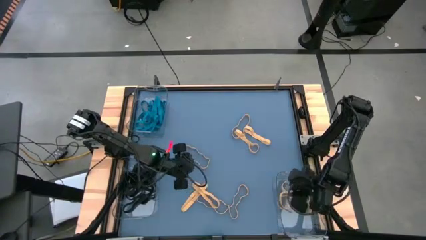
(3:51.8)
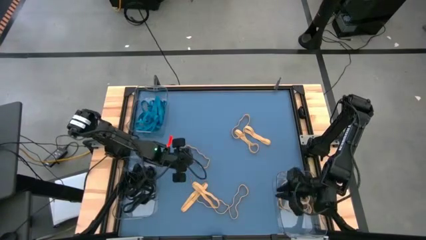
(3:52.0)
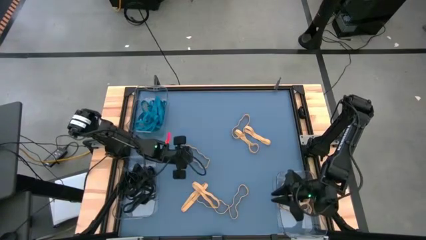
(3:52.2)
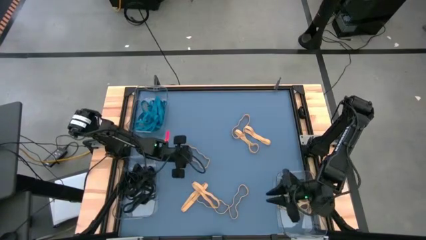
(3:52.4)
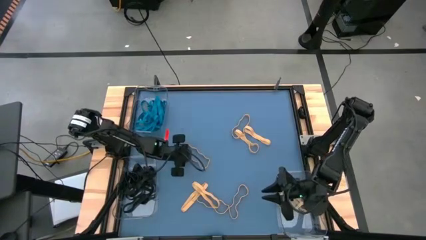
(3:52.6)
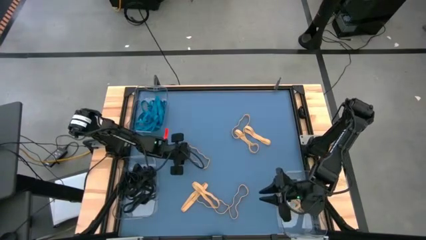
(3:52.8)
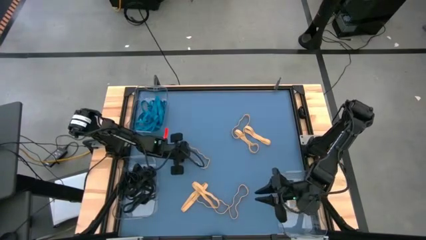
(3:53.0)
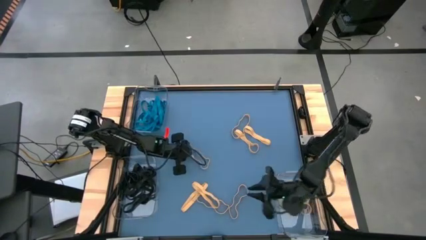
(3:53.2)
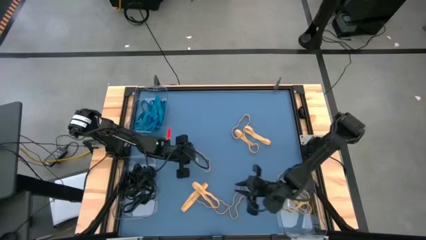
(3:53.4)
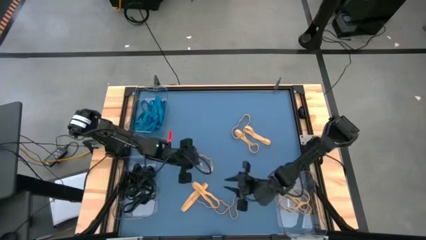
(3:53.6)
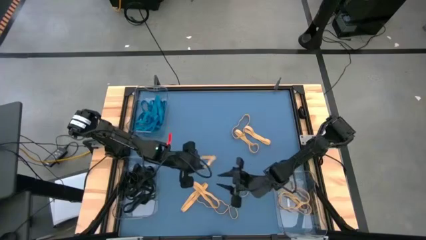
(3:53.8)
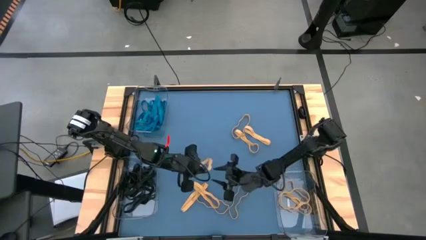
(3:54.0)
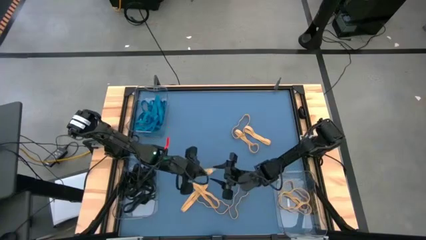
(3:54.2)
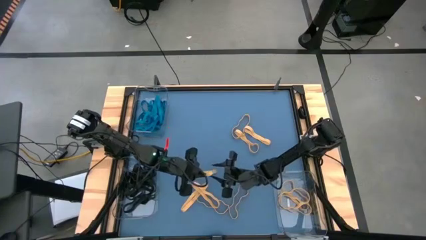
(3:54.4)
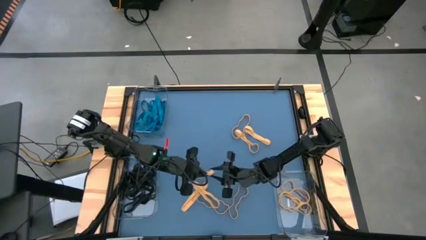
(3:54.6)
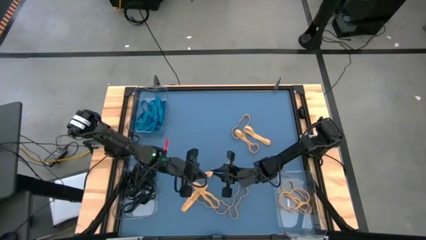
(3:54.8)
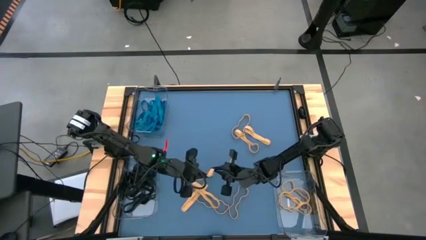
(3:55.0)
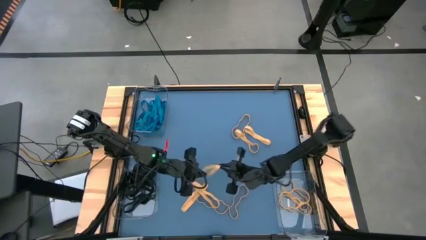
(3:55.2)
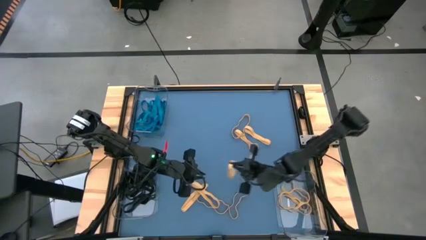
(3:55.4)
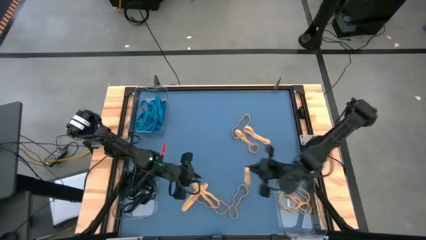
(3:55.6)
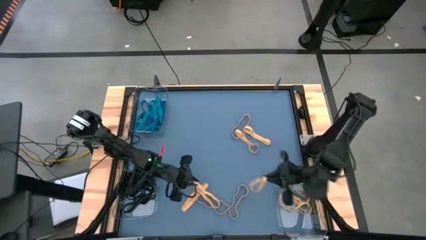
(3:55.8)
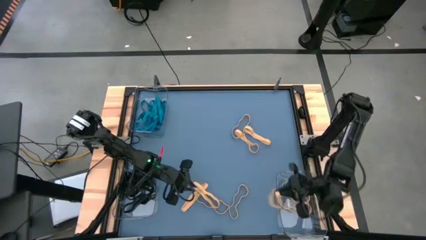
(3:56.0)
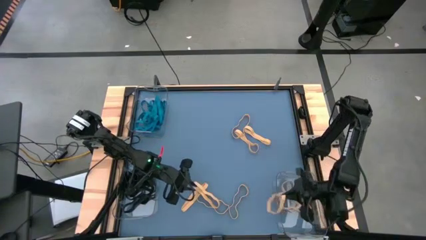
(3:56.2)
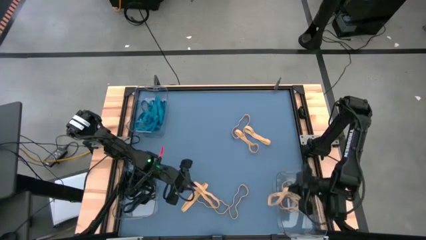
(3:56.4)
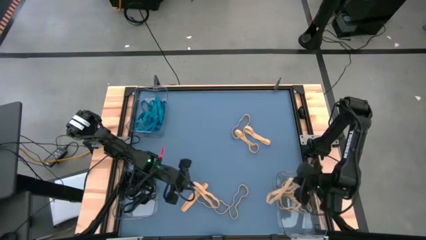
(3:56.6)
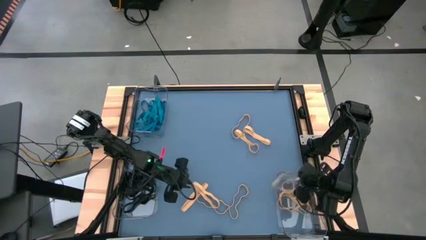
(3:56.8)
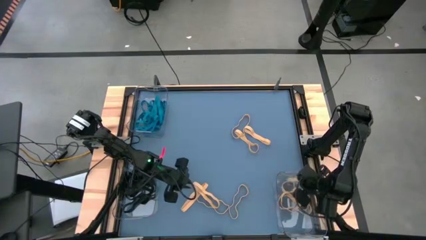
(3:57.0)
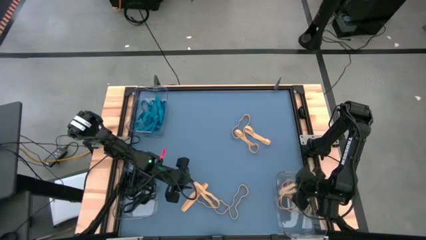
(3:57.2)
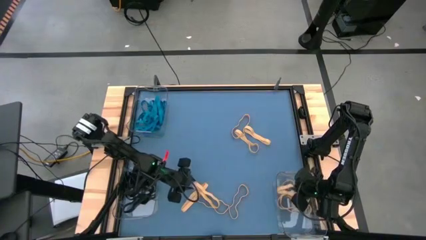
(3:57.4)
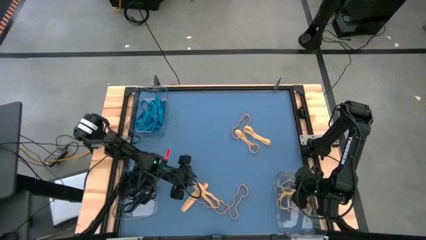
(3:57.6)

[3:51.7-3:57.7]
Task: Sort rubber bands into baskets
Put the yellow rubber band into the bottom right transparent bin

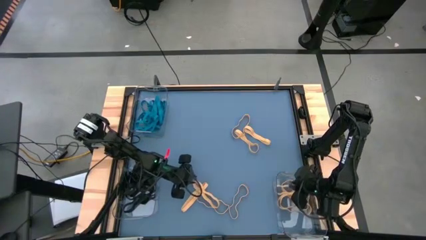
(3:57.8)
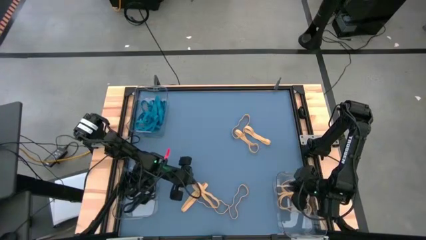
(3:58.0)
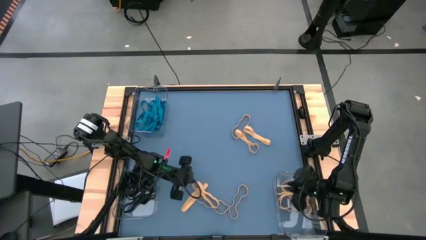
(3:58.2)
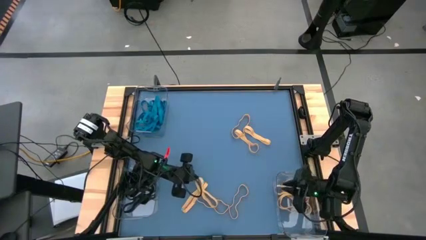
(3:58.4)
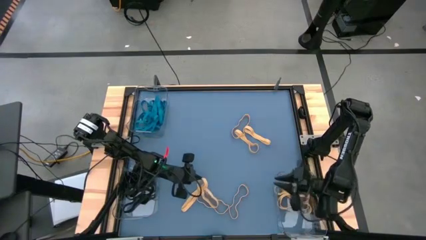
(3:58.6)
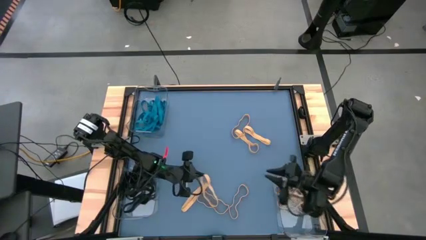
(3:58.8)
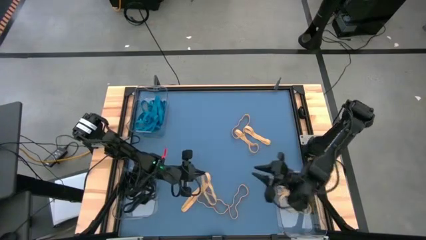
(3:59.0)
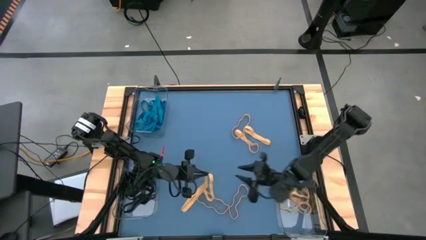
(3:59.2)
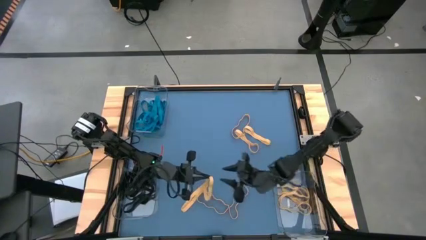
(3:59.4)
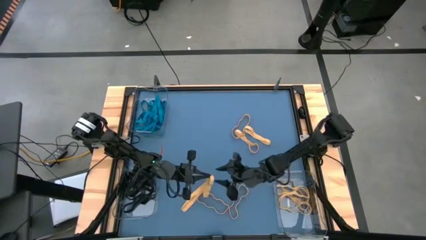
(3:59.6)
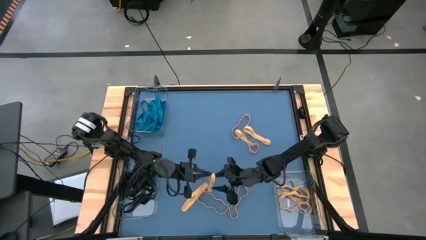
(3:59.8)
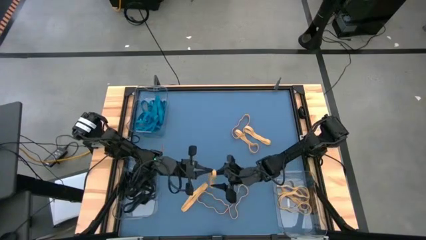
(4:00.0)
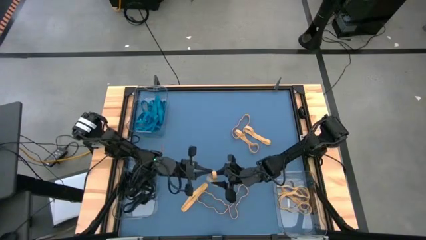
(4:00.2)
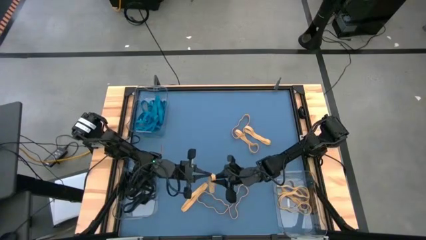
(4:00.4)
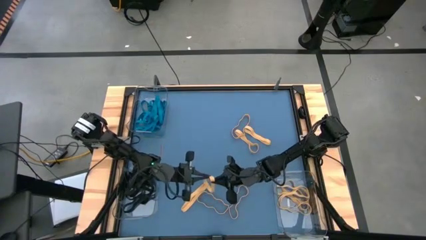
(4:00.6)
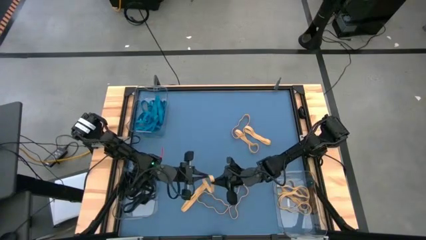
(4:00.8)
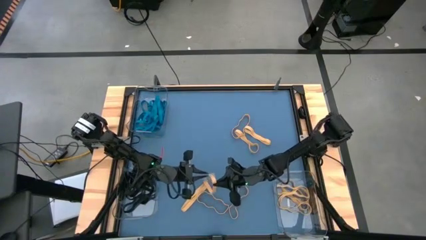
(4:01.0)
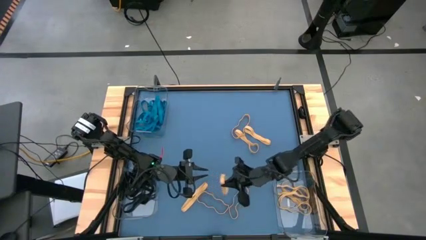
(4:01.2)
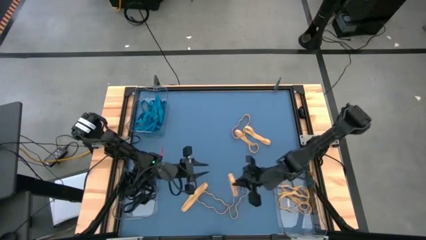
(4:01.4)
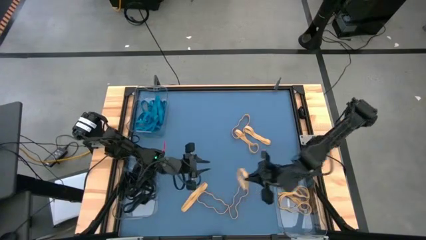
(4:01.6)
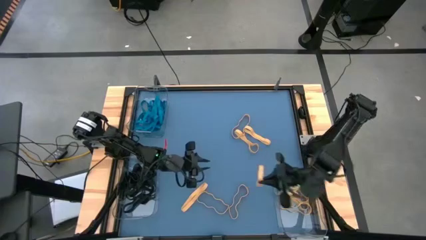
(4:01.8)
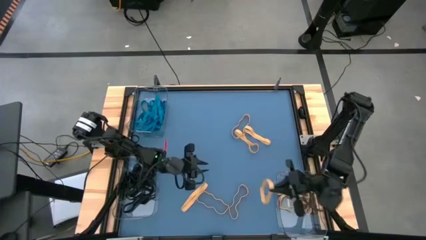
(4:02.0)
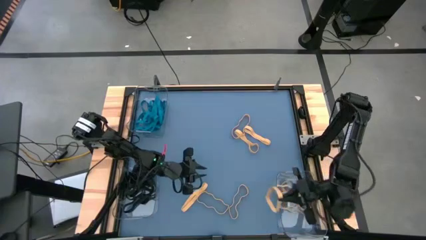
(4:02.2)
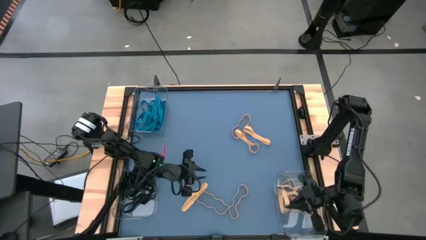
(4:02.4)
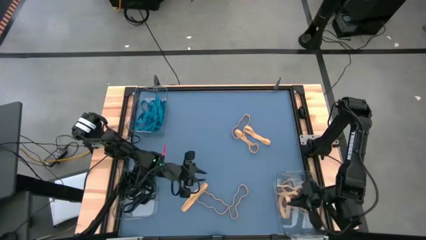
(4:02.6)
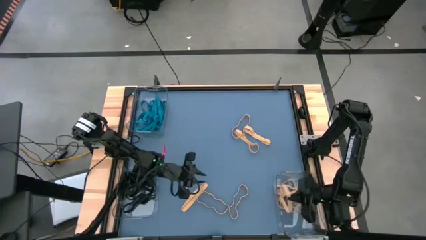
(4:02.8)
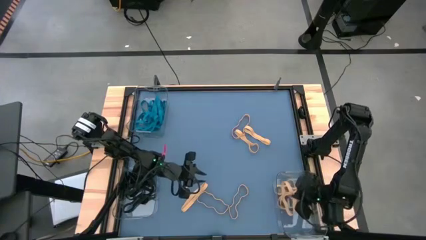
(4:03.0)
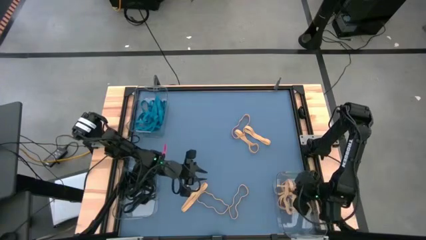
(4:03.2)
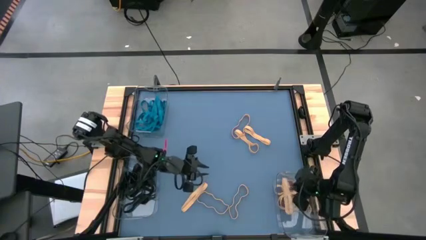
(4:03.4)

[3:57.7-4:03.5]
Put the yellow rubber band into the bottom right transparent bin

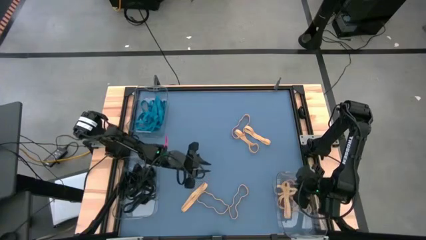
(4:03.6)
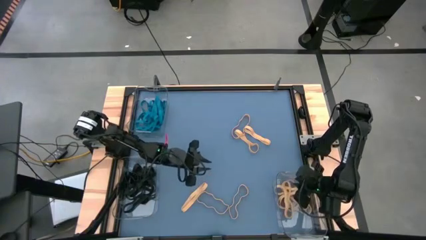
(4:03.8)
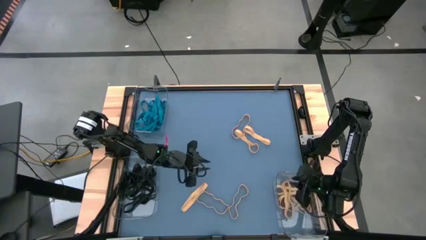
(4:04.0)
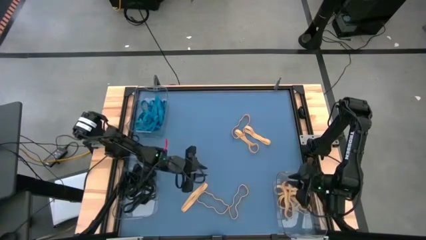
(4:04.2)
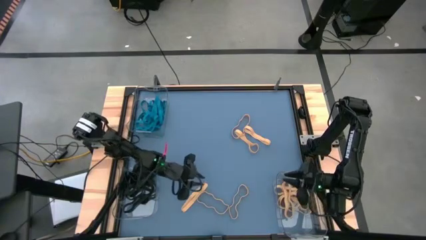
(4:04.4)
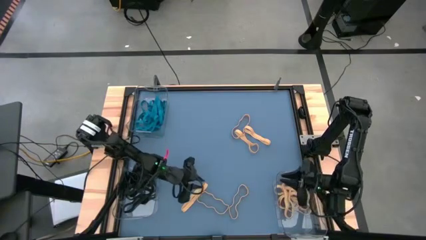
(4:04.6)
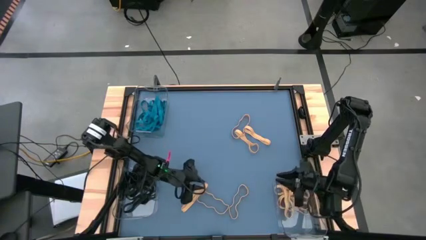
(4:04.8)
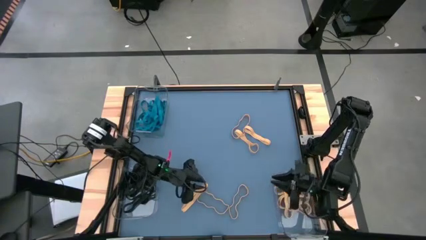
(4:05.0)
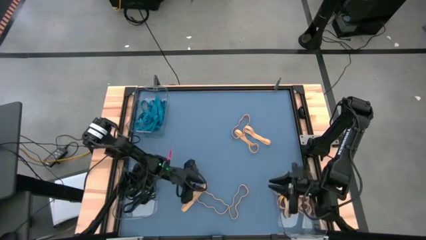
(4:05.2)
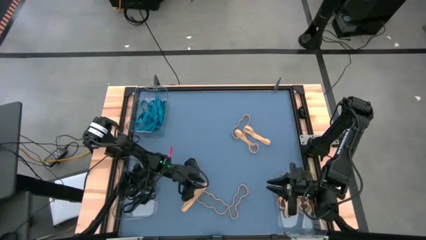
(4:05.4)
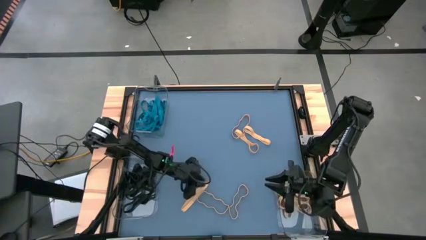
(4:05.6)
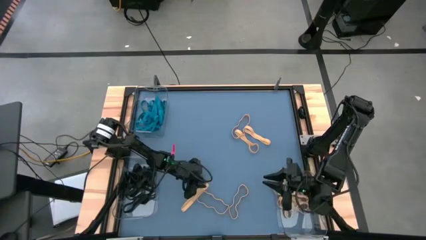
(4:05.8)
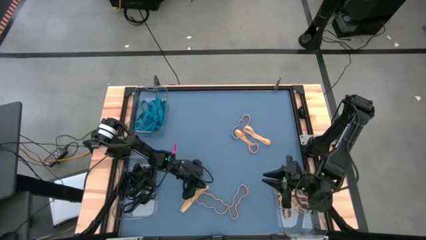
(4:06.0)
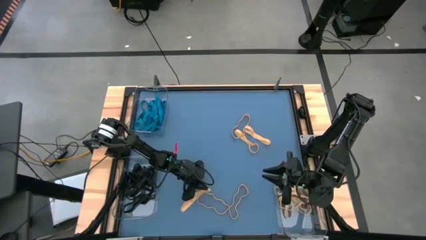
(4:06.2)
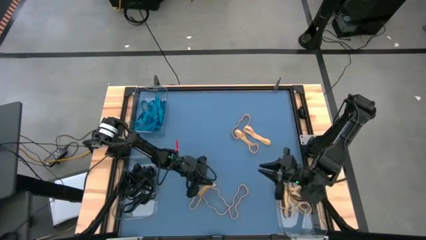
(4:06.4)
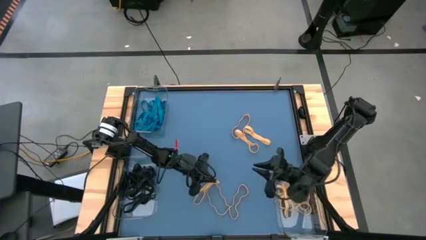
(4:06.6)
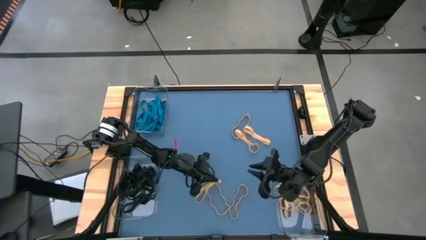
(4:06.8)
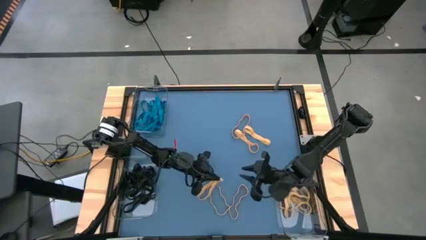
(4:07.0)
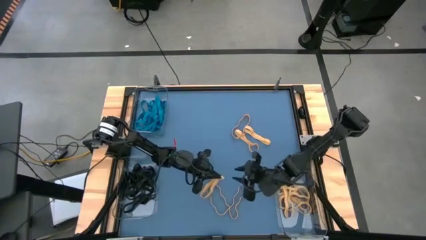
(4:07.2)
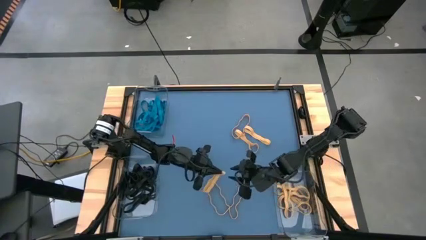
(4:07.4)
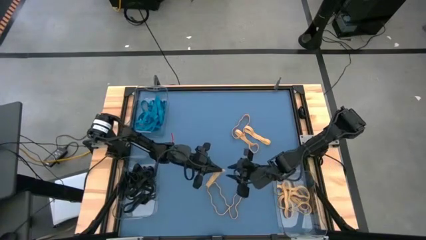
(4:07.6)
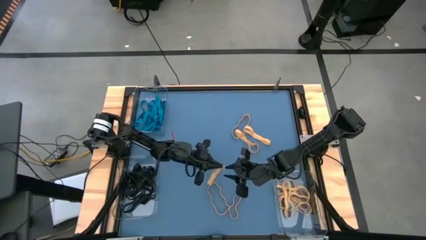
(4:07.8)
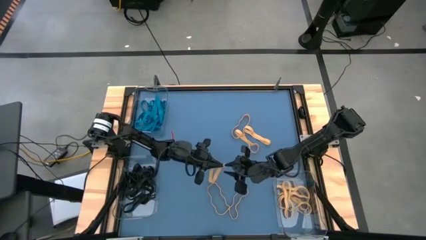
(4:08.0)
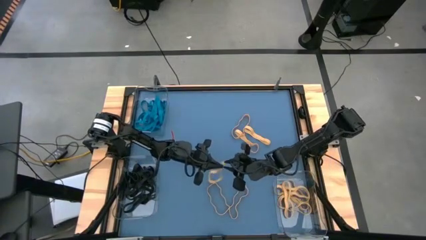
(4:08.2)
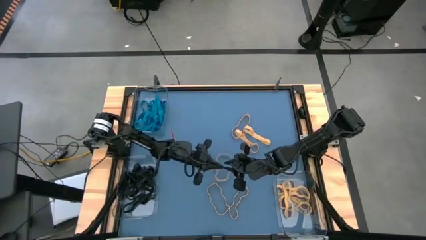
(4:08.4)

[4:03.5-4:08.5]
Put the yellow rubber band into the bottom right transparent bin
